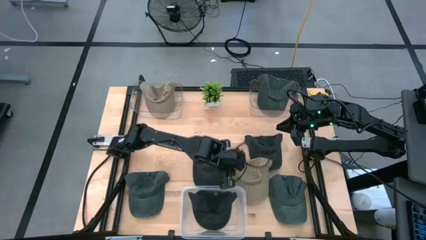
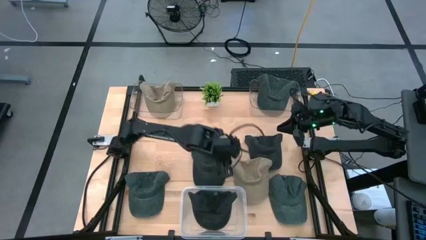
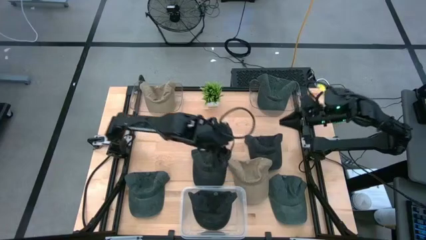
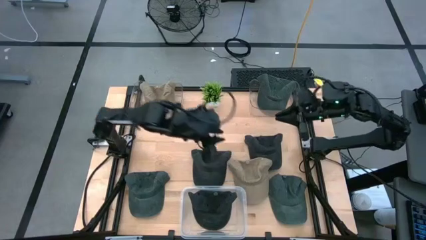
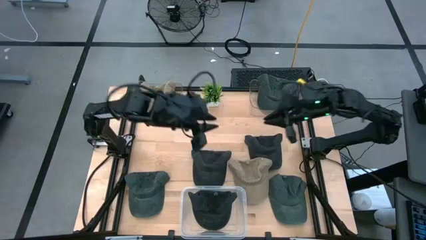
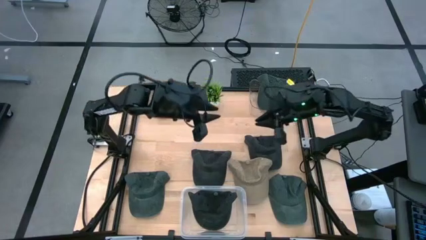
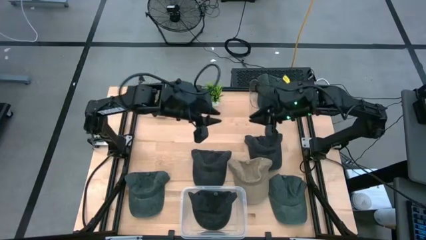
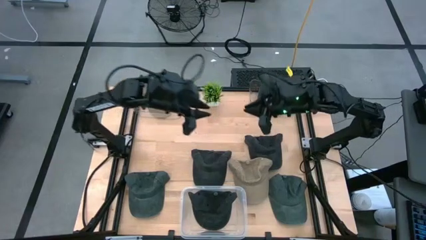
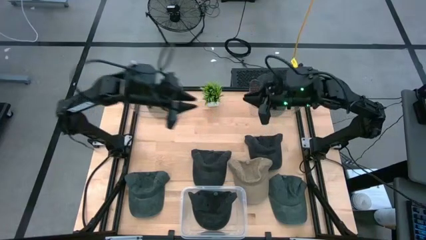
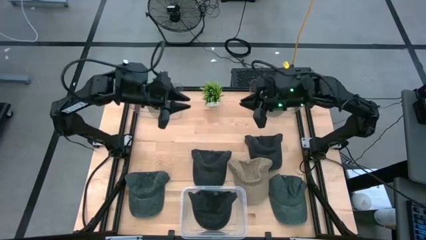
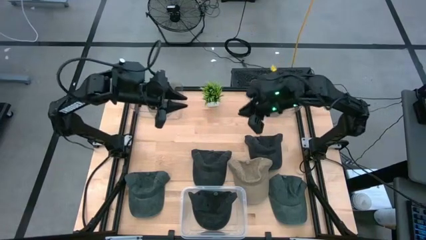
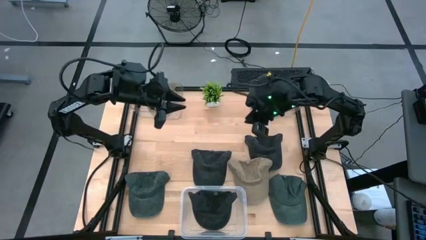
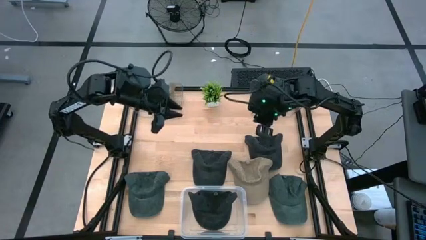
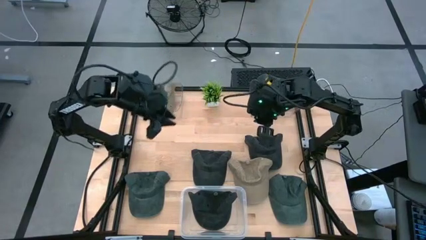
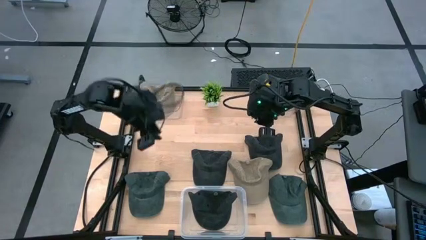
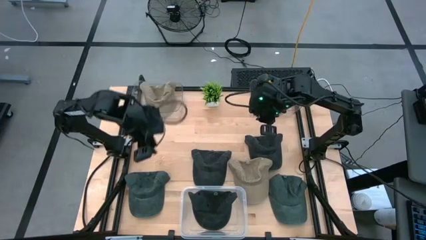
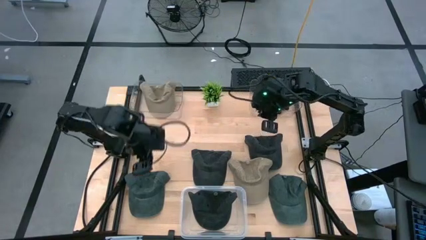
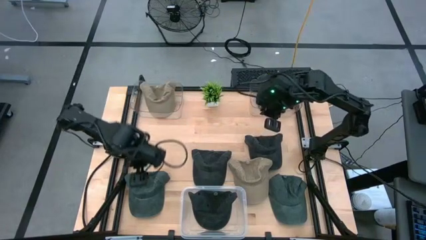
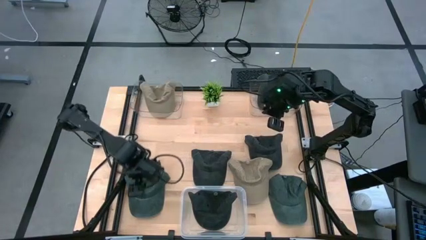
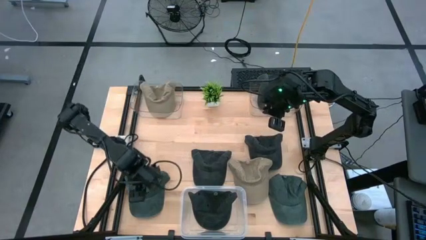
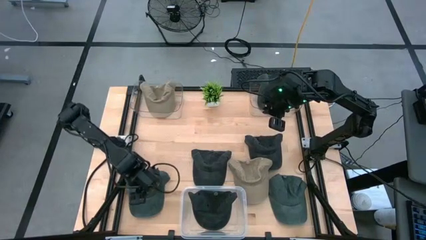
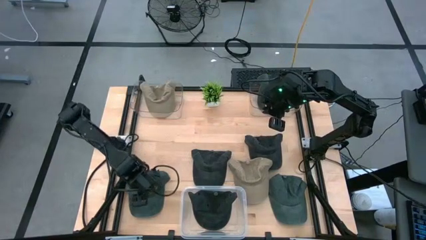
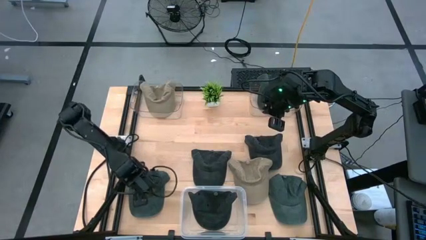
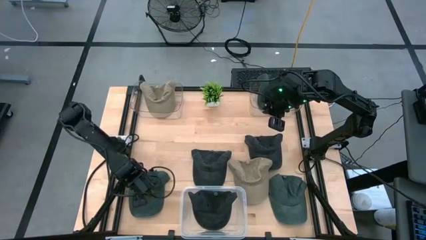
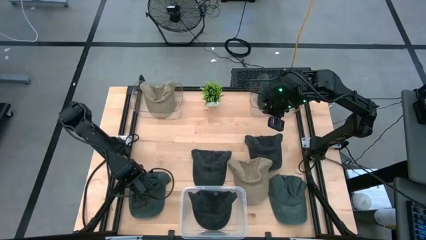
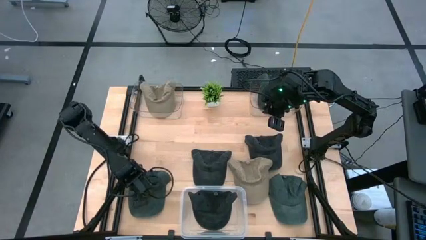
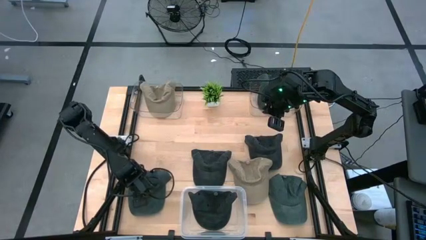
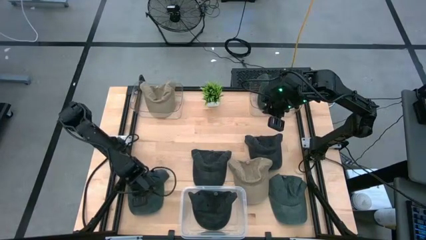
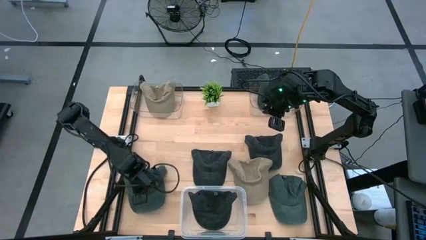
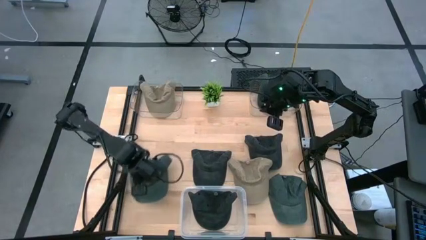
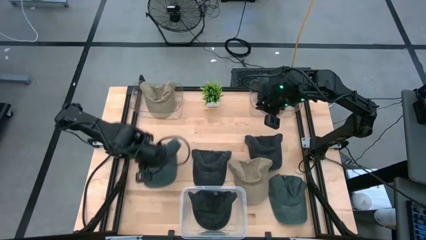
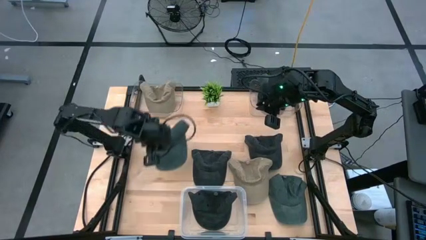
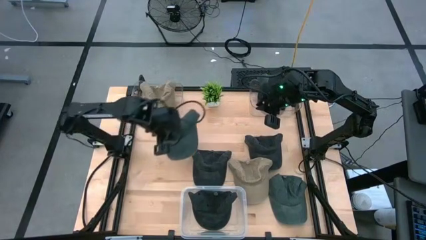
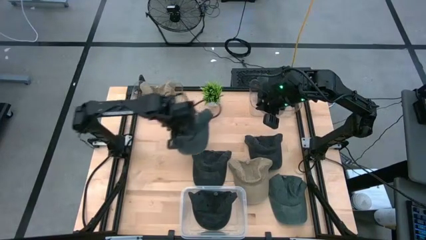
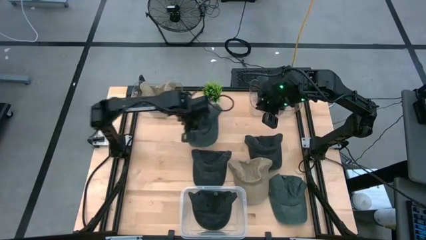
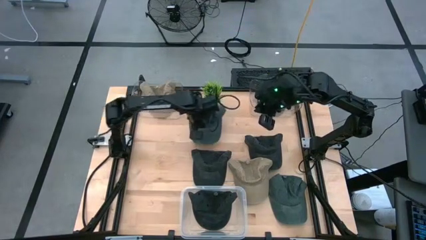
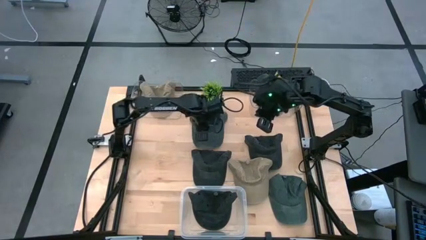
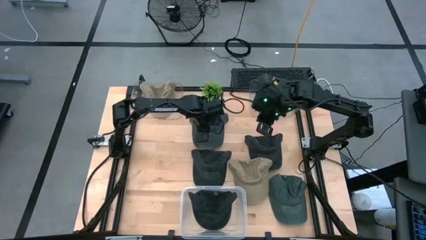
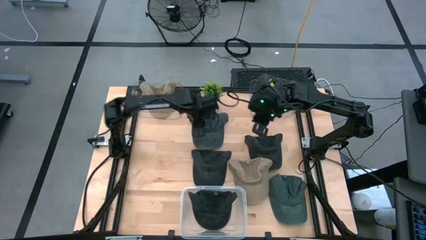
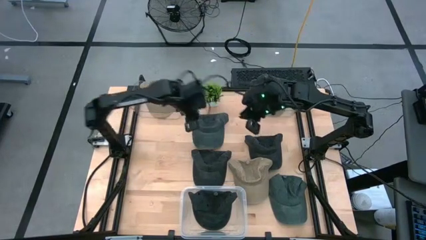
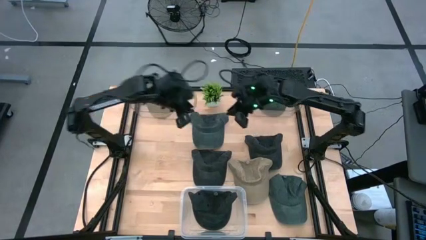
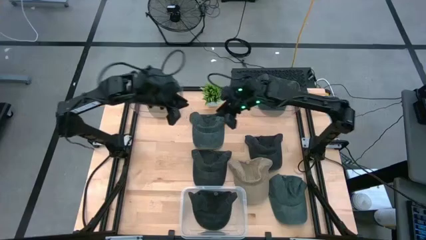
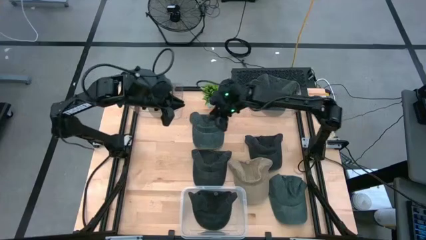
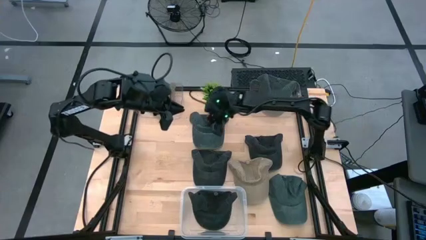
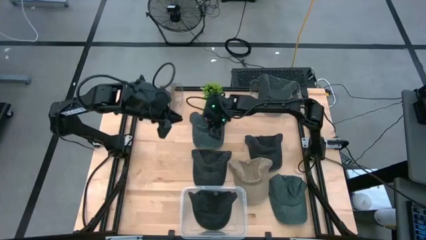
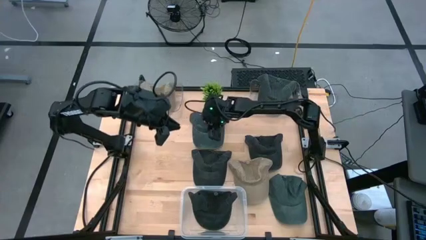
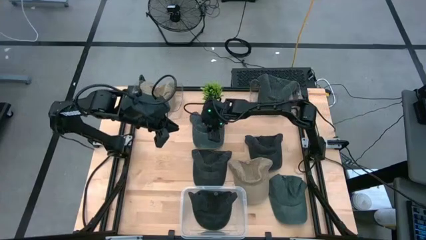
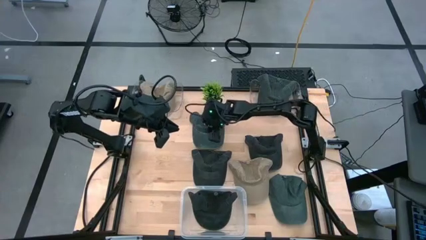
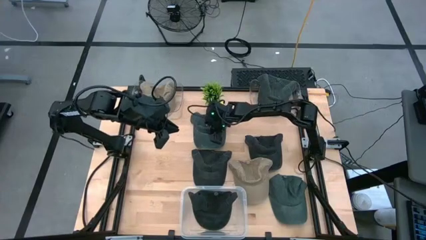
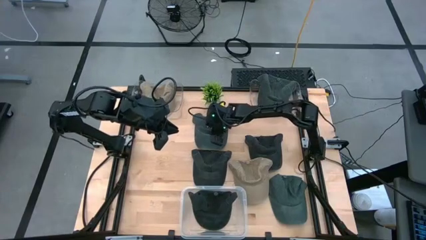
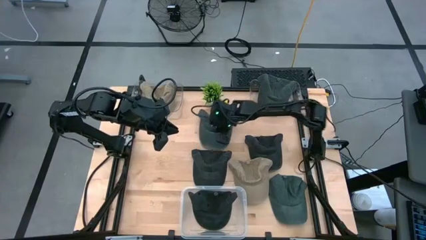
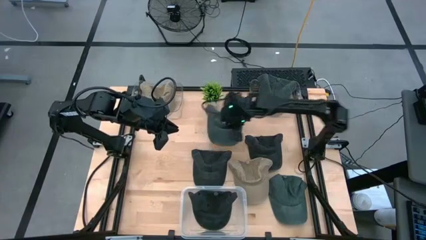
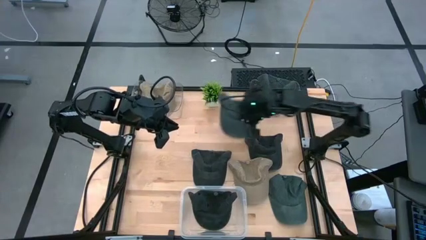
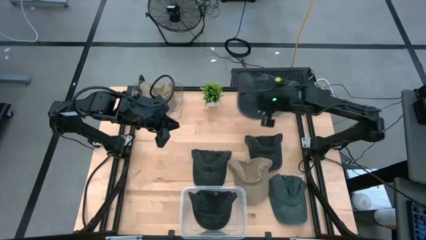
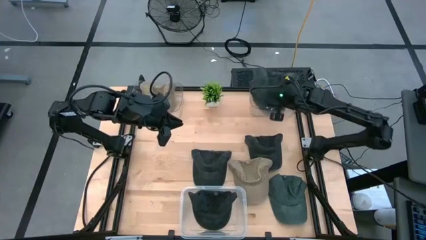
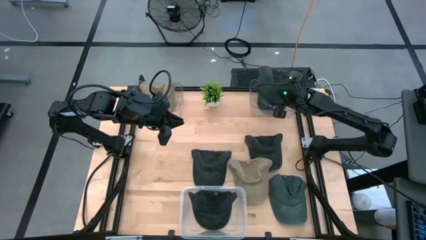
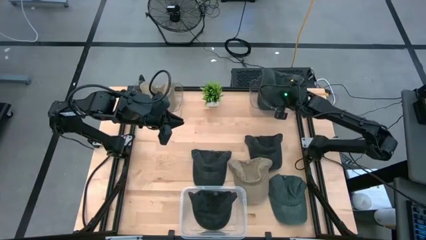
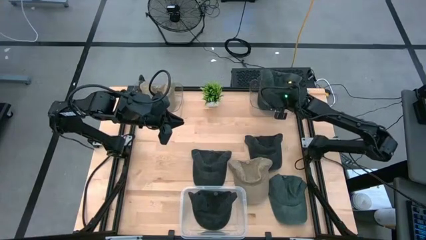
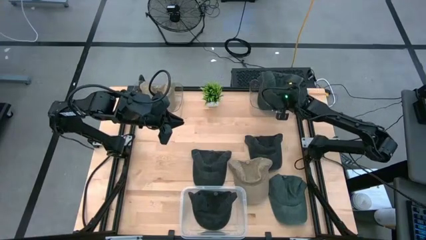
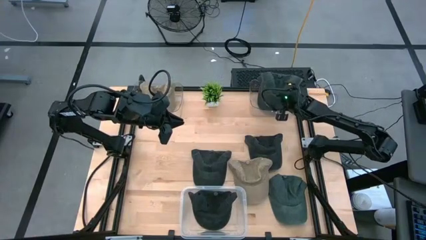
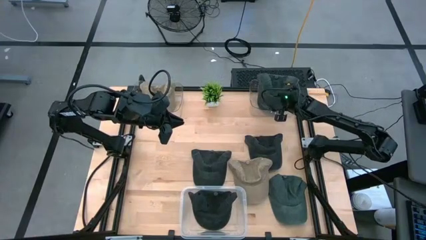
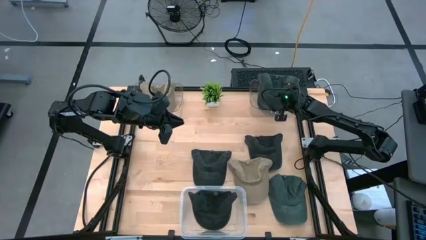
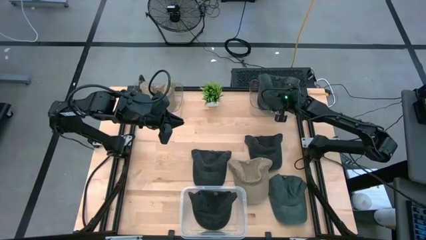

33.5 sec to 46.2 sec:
Task: Pick & Place hat
Put the left dark gray cap into the right transparent bin

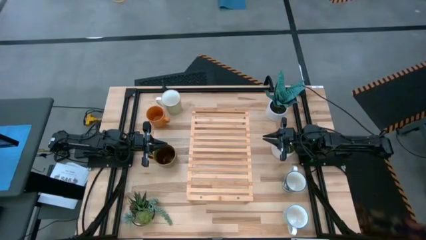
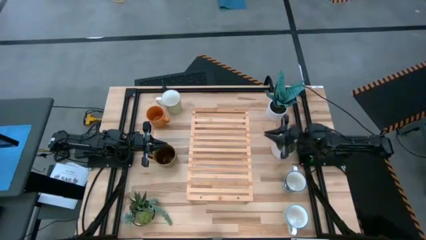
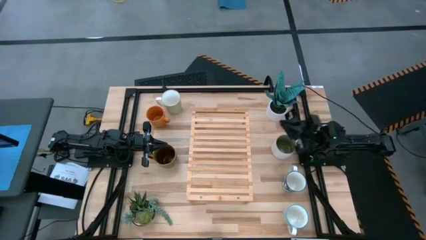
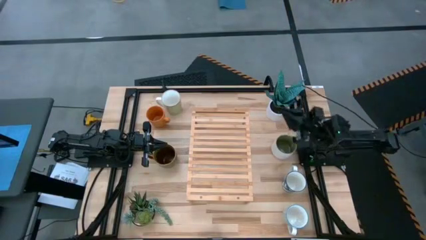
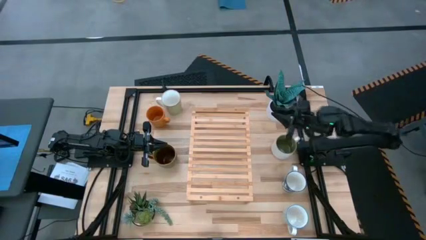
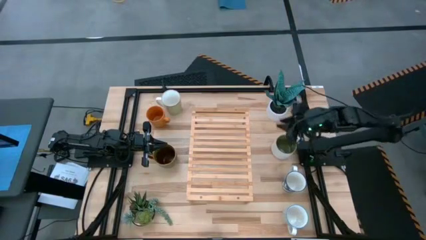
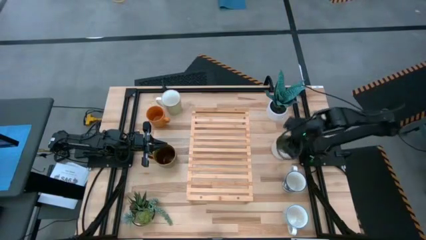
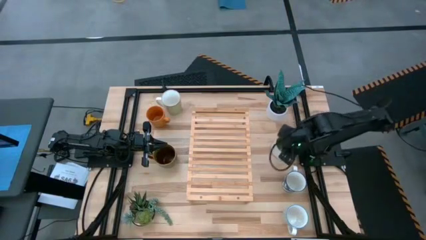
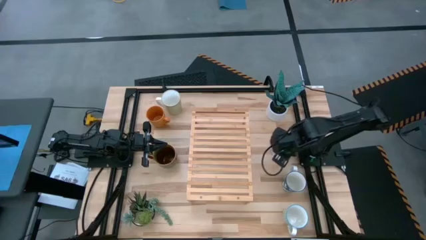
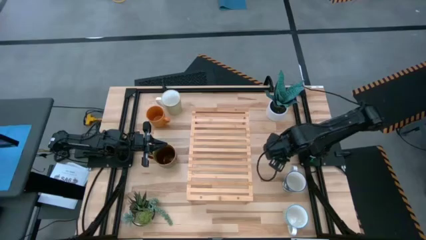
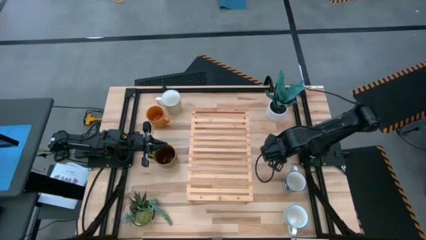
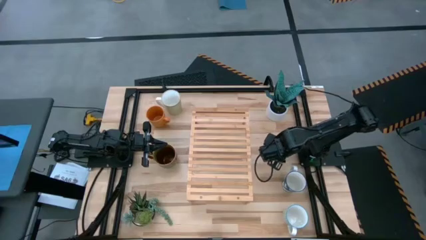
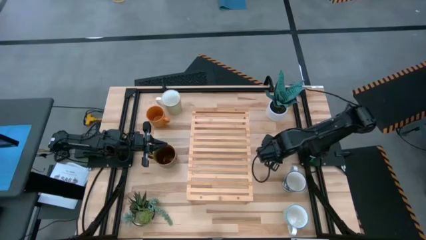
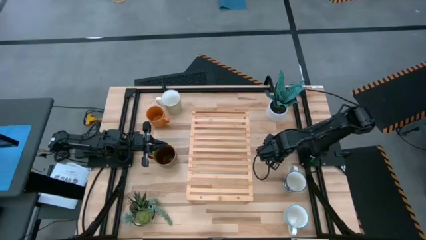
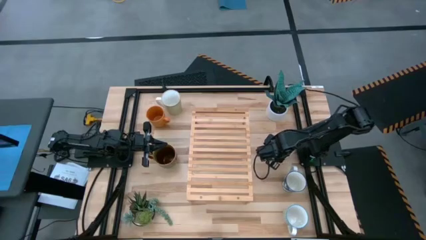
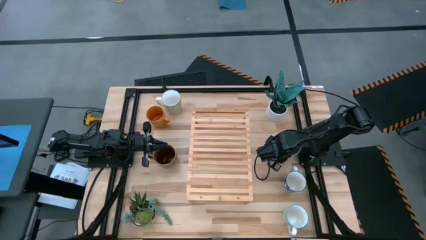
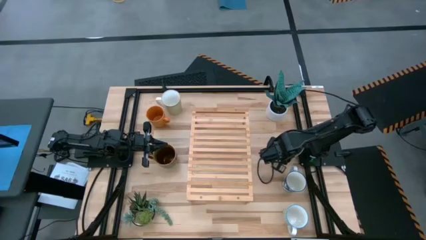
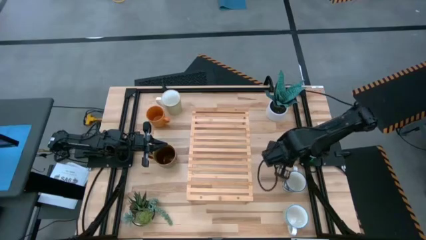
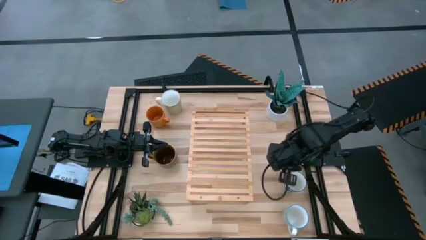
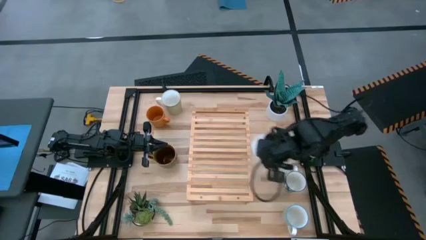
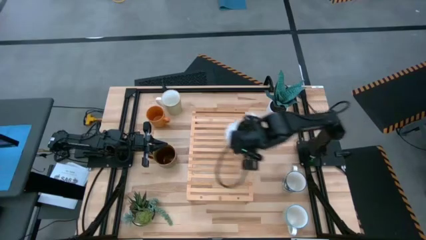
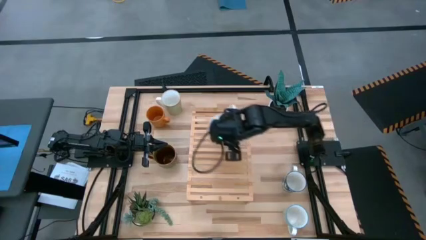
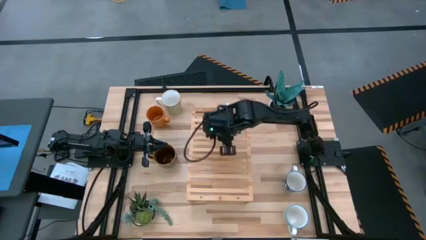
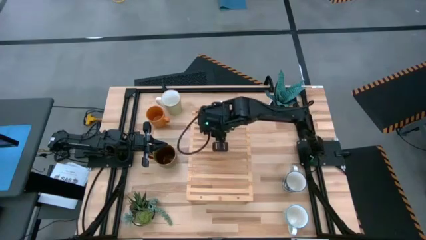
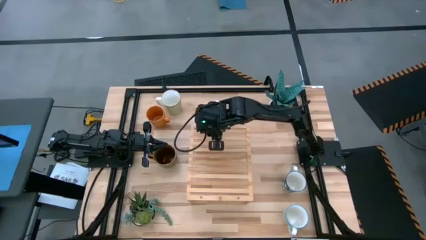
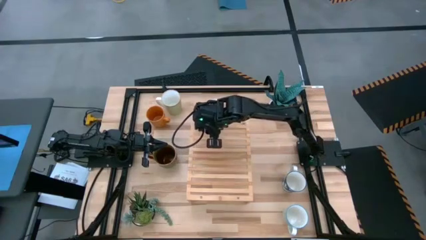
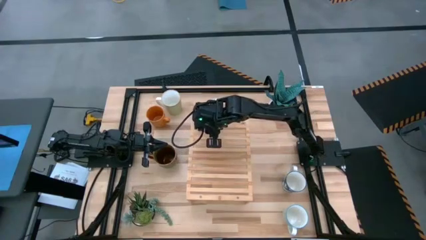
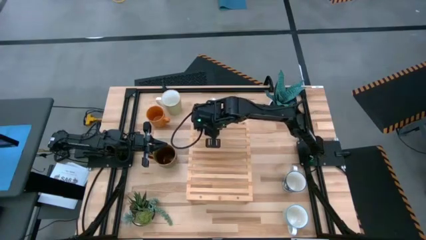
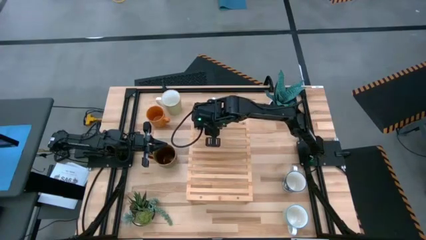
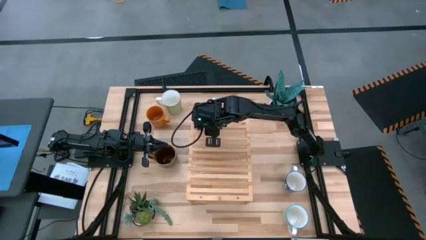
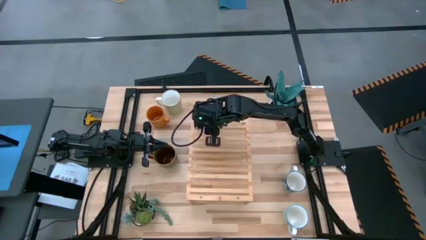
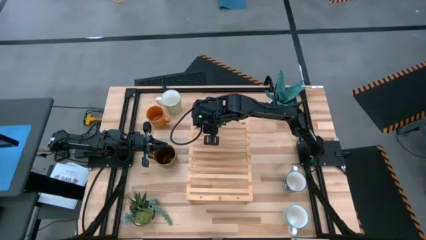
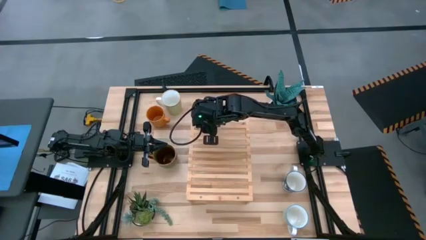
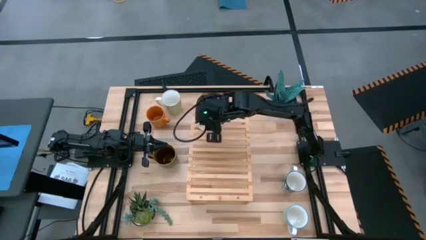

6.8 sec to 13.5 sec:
Task: Place coffee mugs
Put the white mug on the shelf
